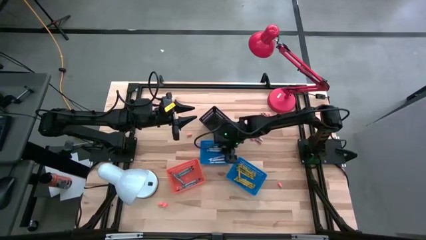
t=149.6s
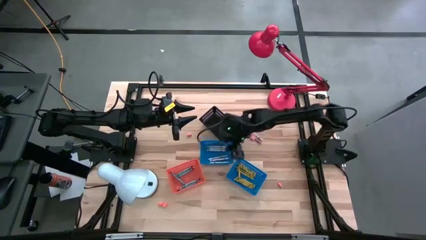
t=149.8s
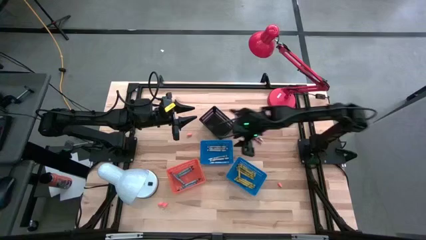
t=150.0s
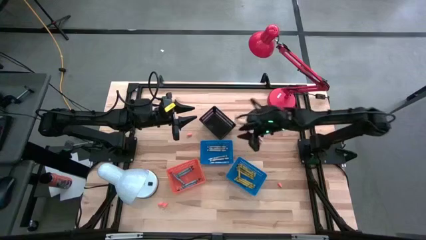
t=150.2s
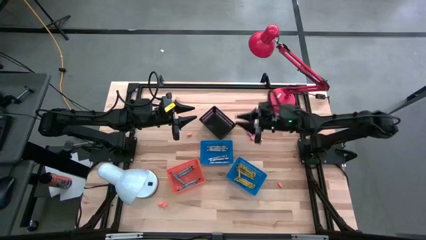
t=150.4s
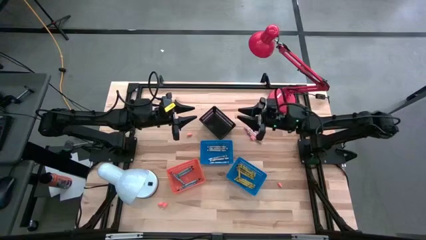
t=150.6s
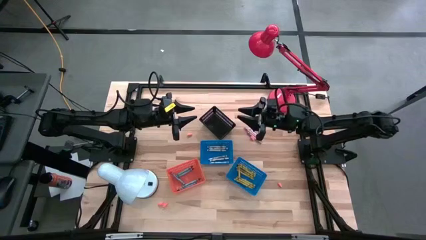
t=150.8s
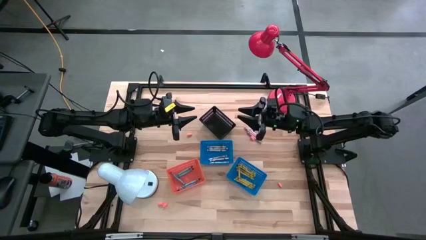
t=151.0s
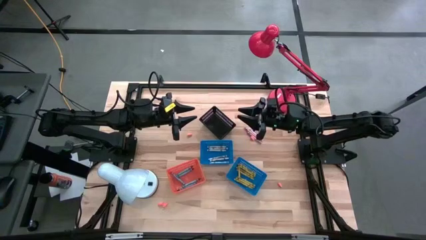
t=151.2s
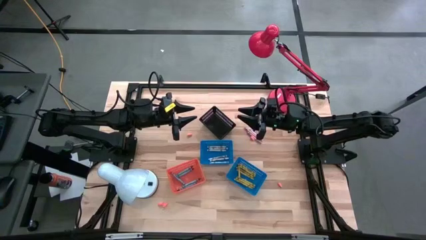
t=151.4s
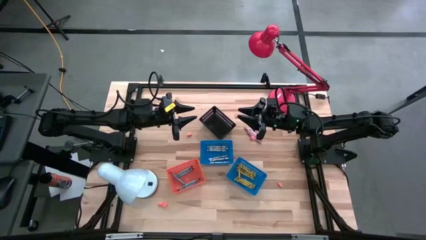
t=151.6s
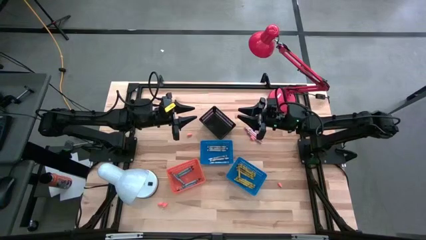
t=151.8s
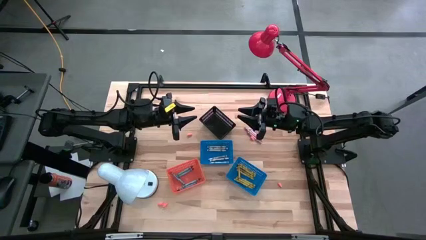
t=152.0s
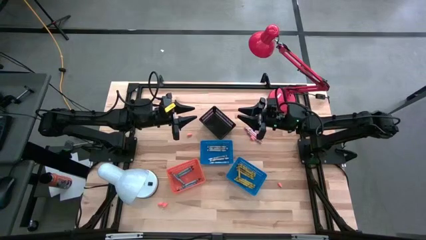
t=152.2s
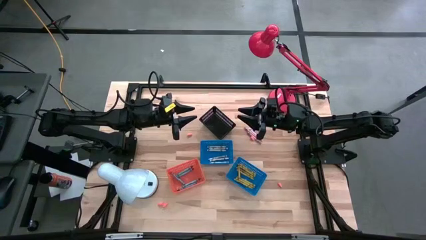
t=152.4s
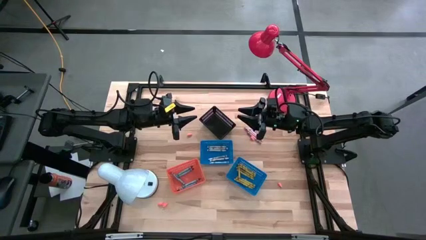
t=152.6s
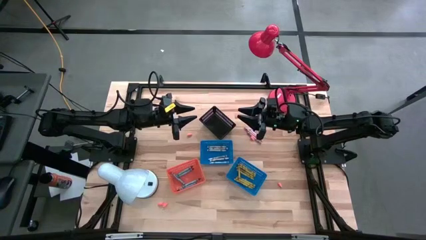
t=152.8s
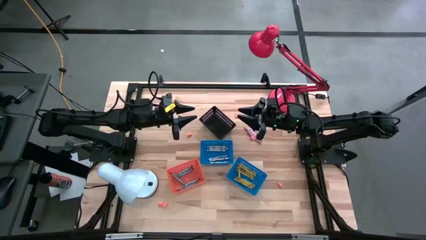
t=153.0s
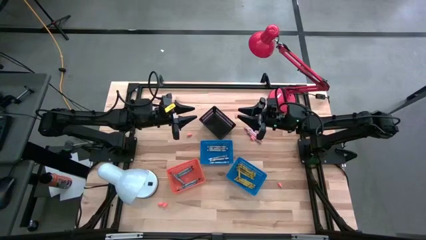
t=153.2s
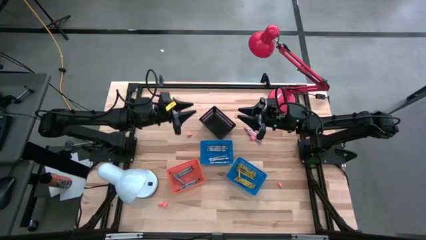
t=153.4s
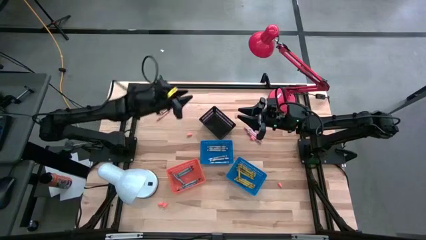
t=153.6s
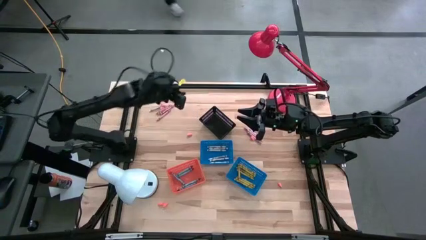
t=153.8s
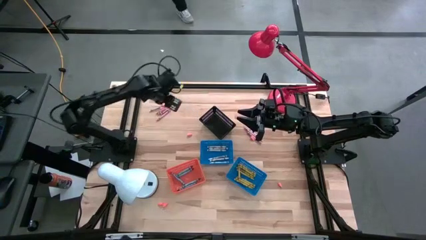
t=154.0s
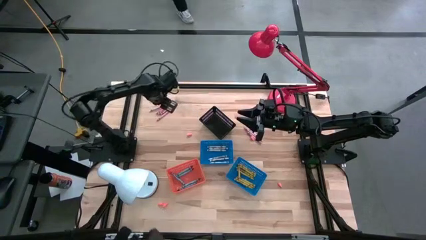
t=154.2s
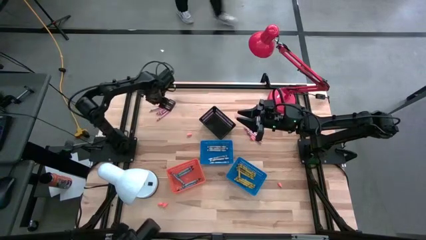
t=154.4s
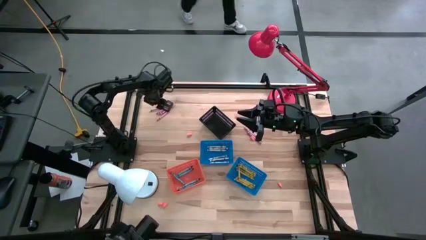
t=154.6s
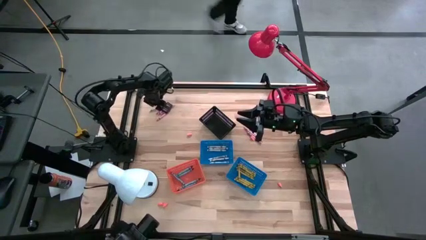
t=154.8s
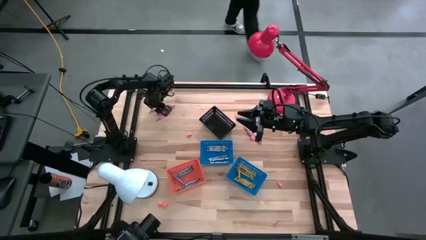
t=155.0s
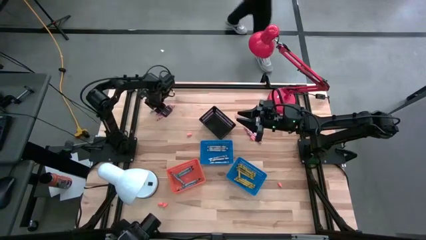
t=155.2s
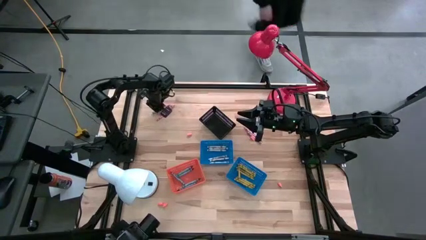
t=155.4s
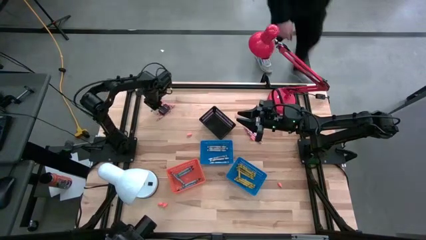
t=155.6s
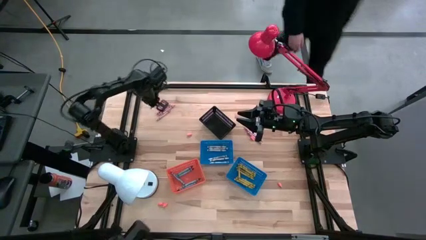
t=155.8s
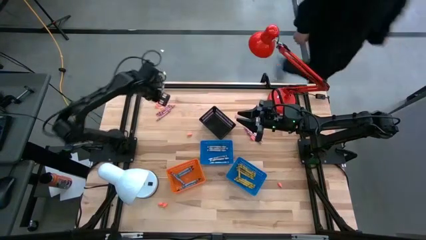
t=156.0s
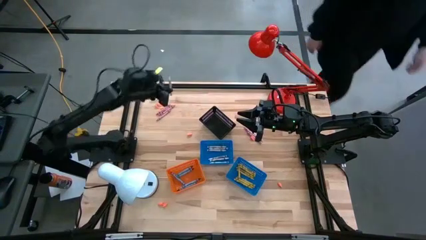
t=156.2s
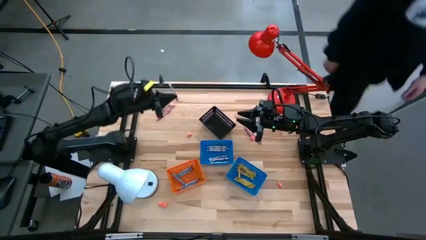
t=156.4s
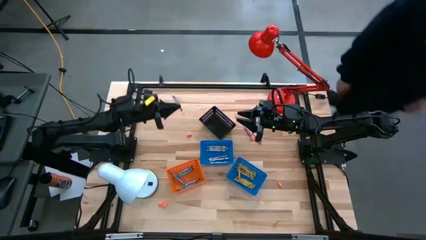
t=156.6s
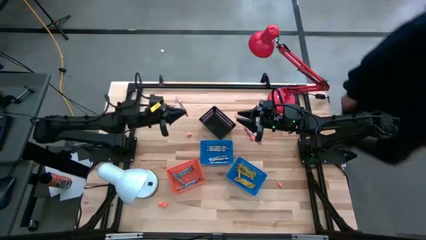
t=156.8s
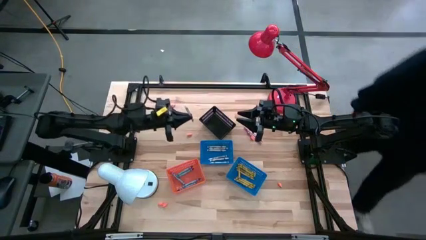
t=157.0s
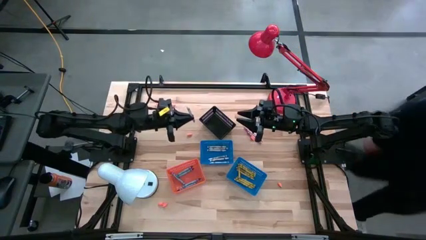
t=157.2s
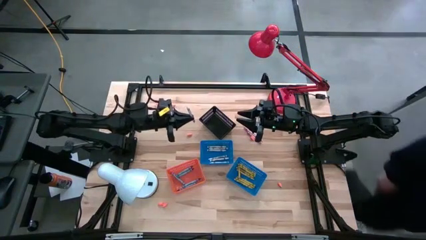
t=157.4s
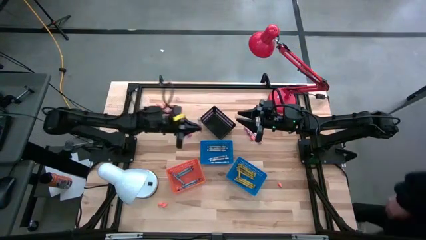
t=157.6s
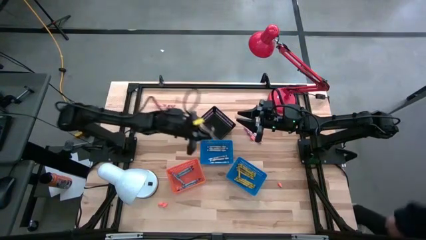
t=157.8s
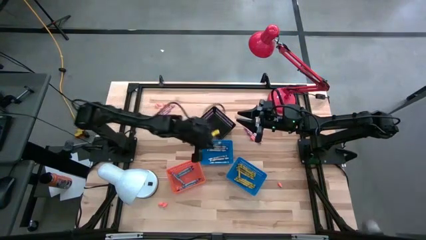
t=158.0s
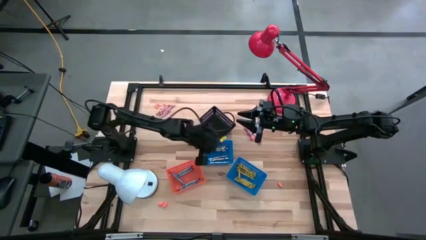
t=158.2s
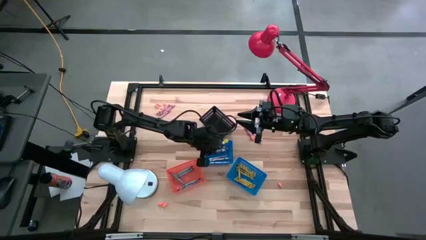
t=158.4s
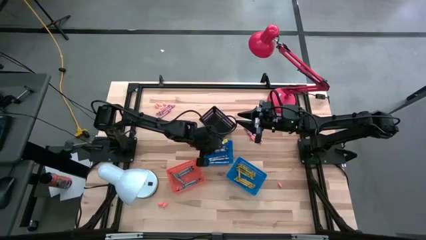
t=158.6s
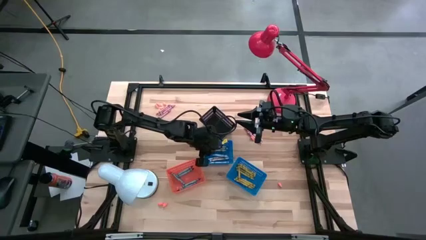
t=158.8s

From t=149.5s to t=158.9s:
Task: Sort crayons
Put the white crayon into the left blue bin

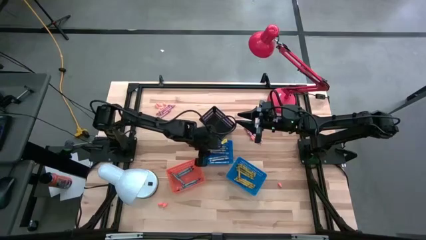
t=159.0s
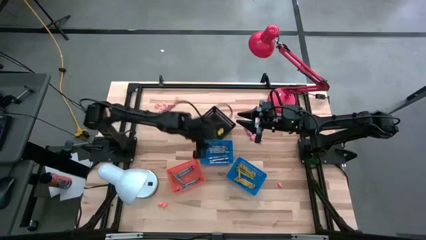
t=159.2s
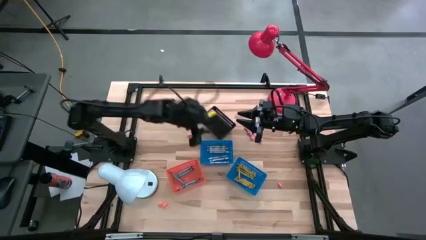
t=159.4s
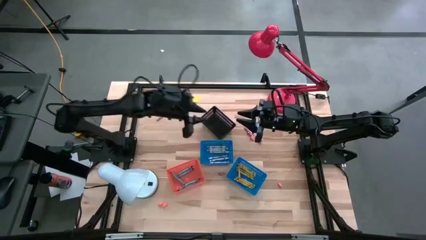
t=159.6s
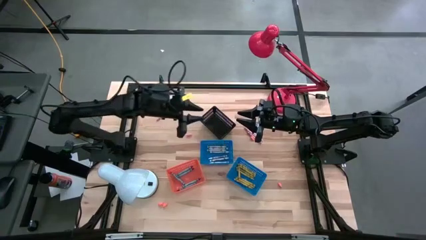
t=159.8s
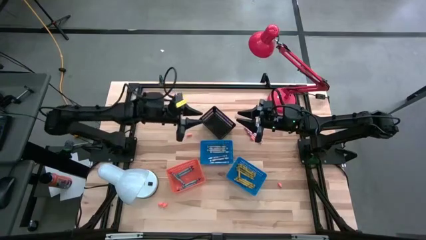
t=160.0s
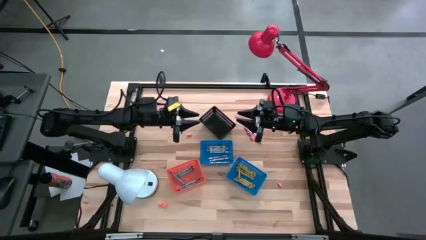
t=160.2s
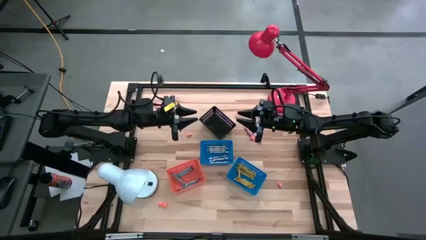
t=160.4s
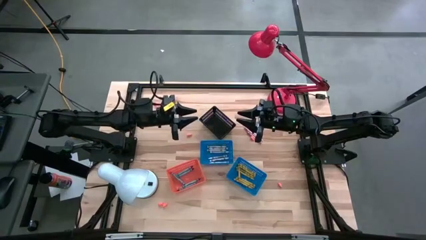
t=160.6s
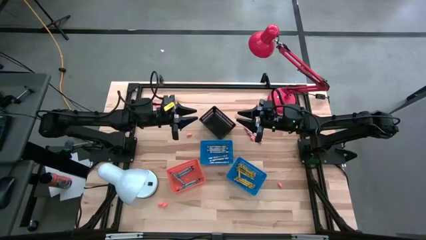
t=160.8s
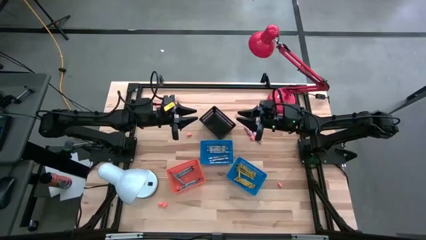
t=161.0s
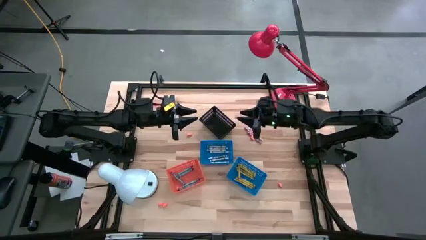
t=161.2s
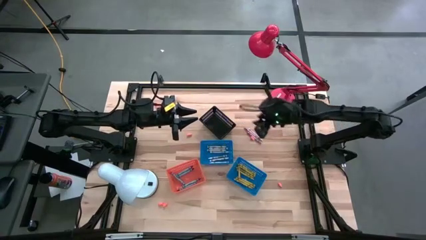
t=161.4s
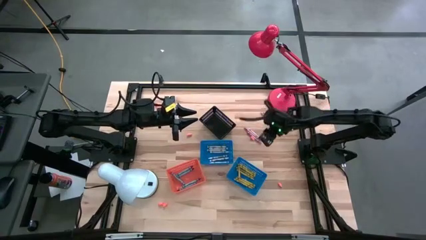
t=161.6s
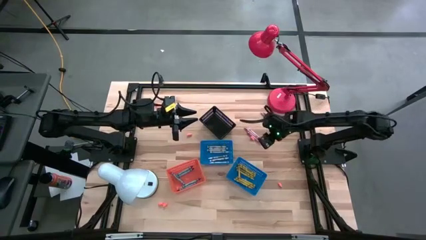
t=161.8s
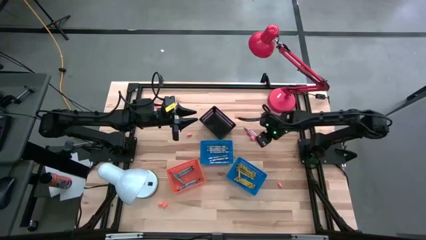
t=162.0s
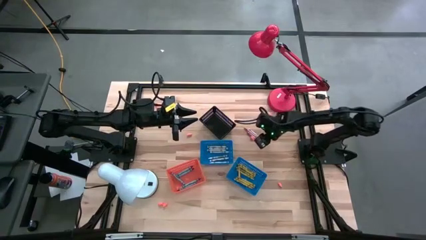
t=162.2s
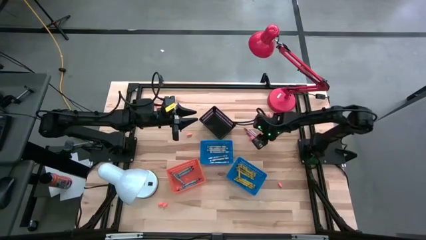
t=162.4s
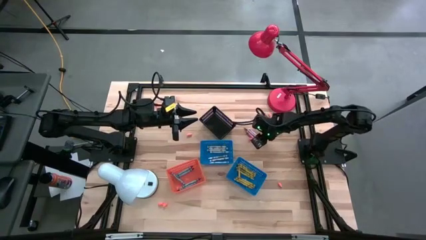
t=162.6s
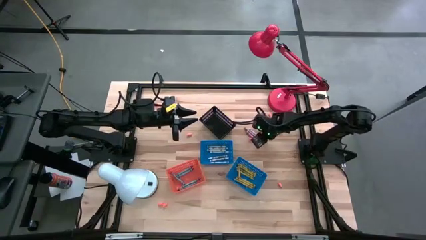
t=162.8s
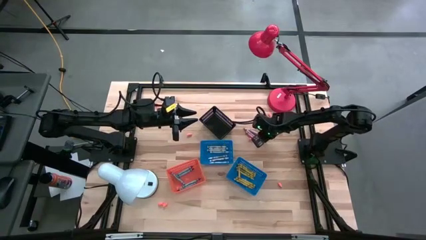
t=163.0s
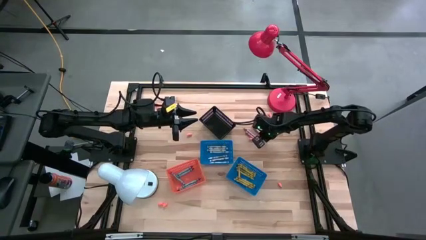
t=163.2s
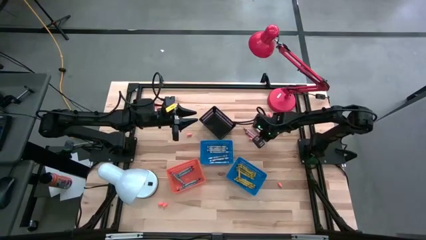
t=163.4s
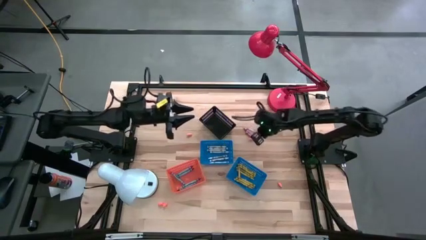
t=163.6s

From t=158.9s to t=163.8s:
Put the white crayon into the left blue bin

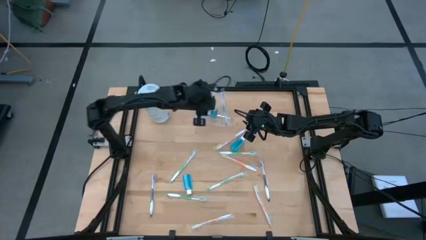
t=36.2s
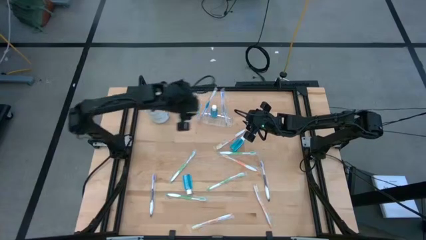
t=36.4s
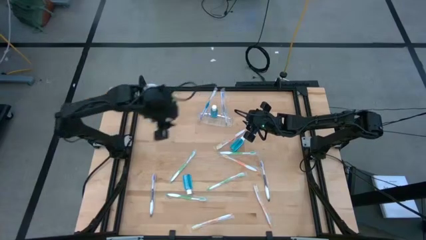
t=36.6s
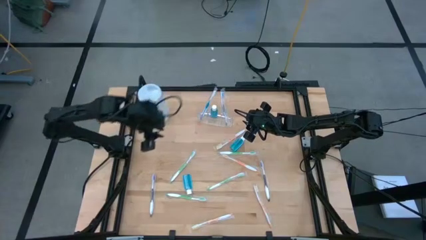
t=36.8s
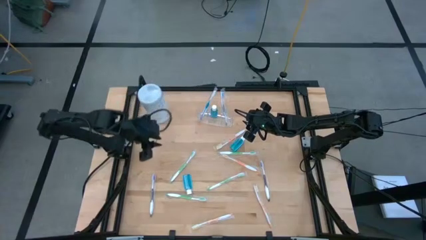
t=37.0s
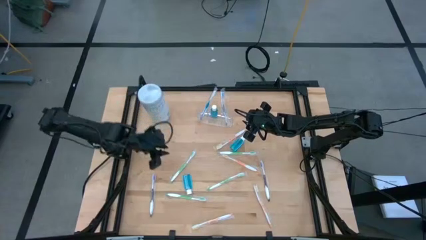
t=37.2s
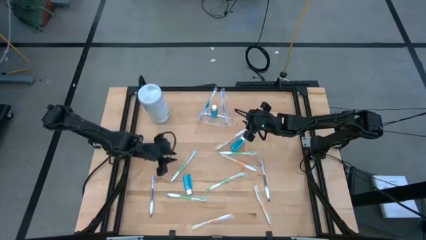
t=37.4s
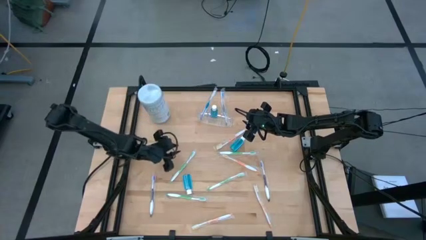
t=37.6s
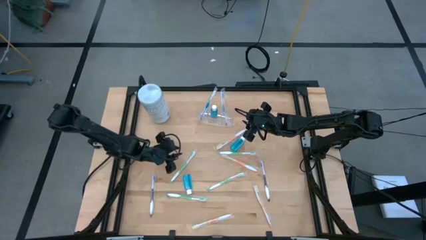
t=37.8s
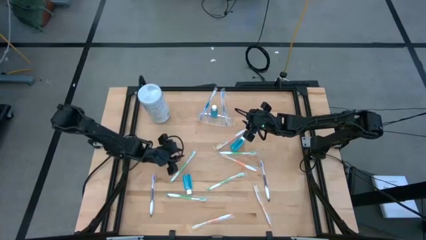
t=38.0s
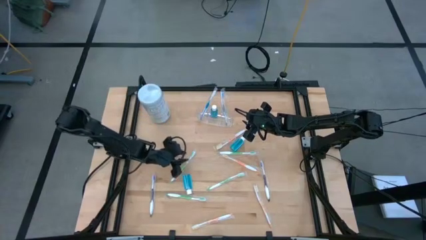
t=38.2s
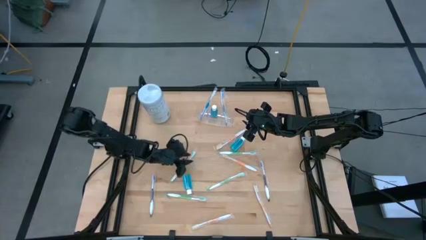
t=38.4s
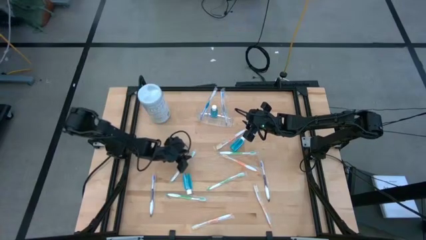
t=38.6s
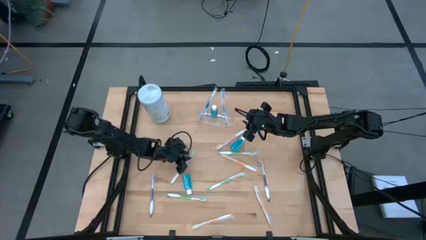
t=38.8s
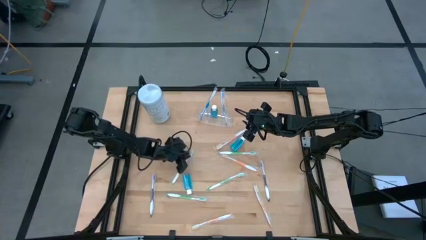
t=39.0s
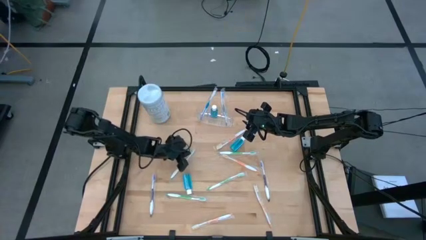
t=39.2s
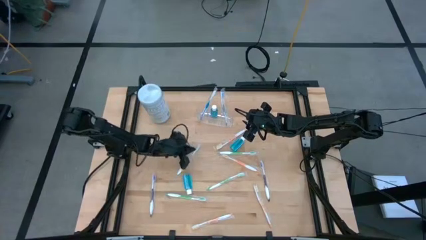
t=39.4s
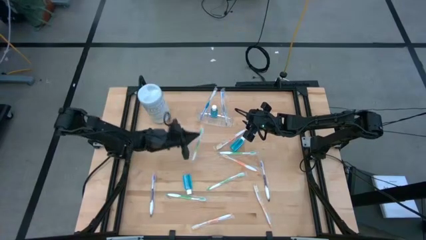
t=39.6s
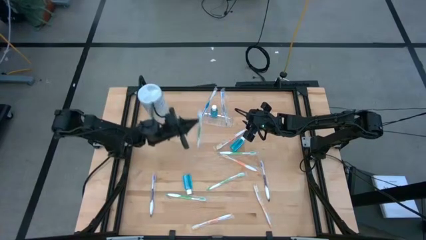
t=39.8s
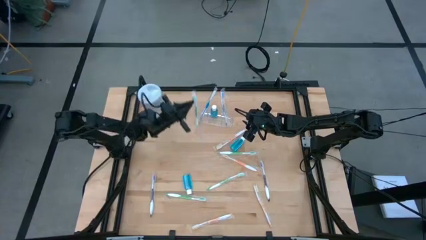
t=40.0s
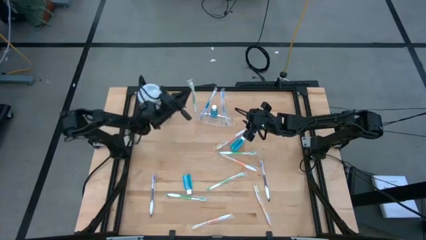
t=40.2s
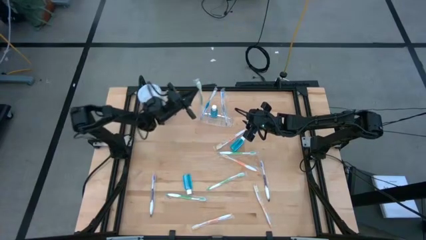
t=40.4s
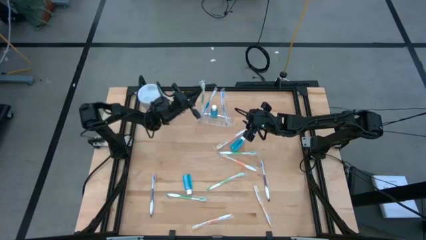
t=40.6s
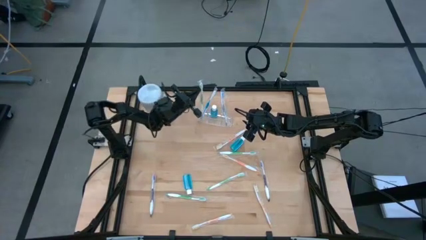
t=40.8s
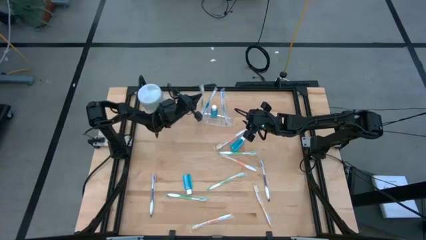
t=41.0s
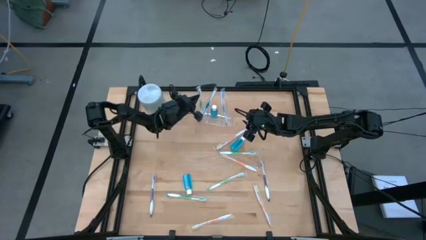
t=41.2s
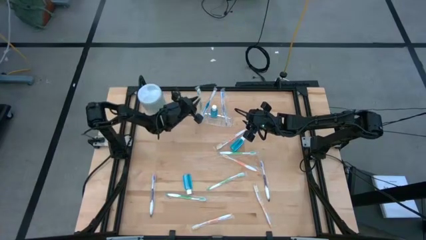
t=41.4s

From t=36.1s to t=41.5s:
Task: Pick & Place toothbrushing station
Put the green toothbrush into the transparent organizer
